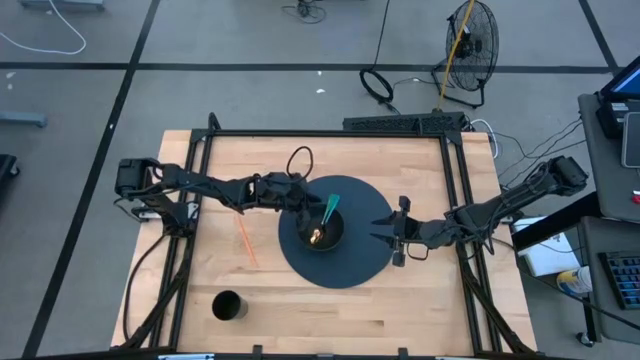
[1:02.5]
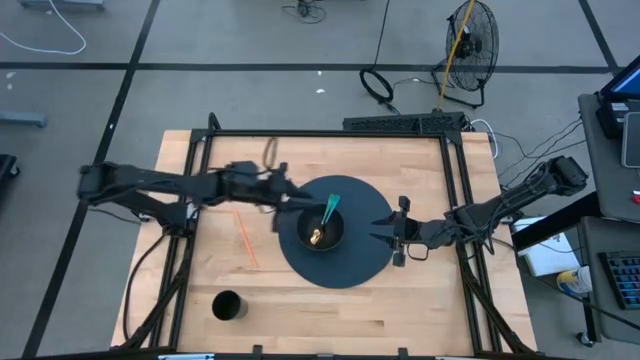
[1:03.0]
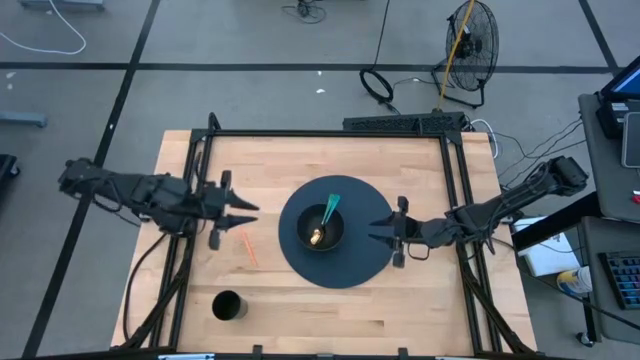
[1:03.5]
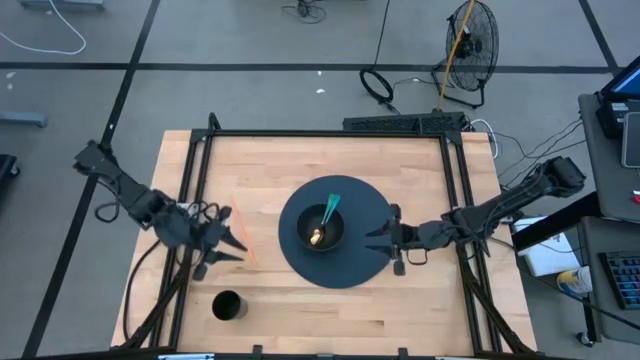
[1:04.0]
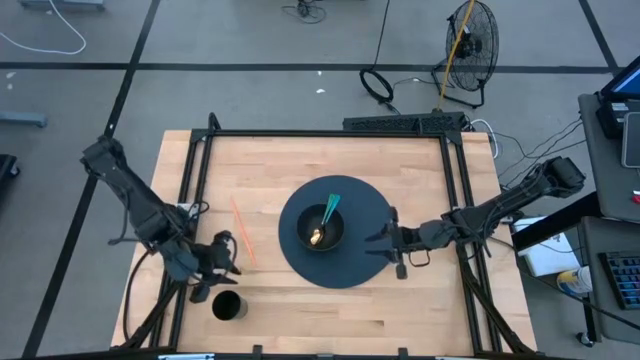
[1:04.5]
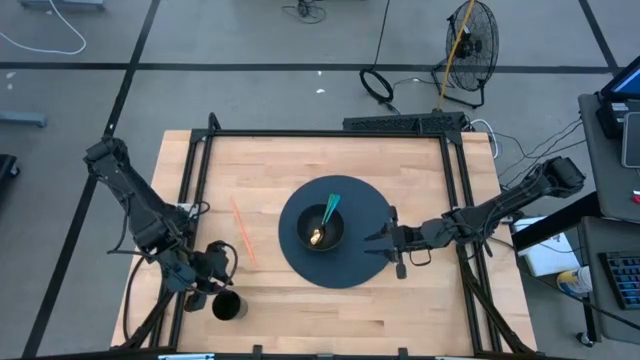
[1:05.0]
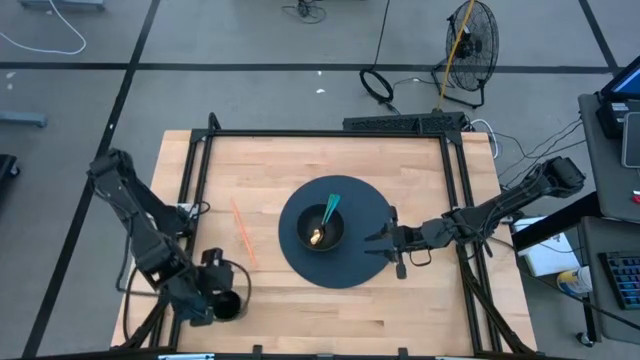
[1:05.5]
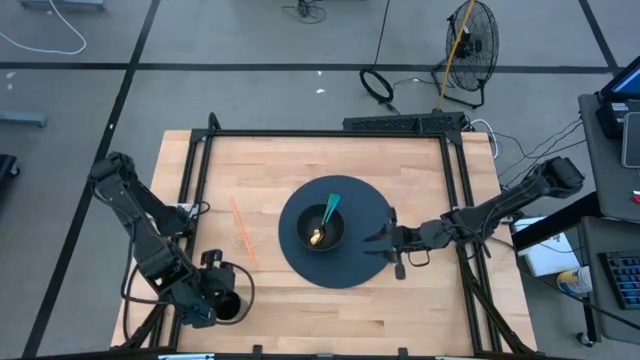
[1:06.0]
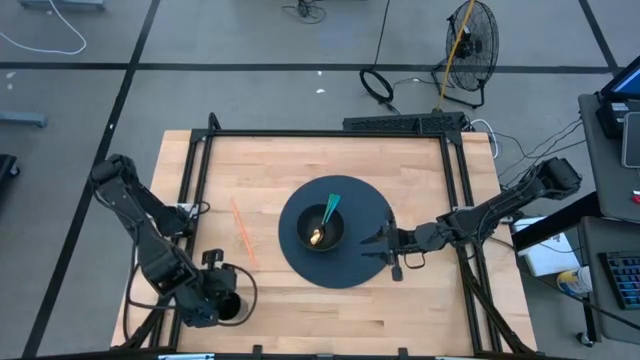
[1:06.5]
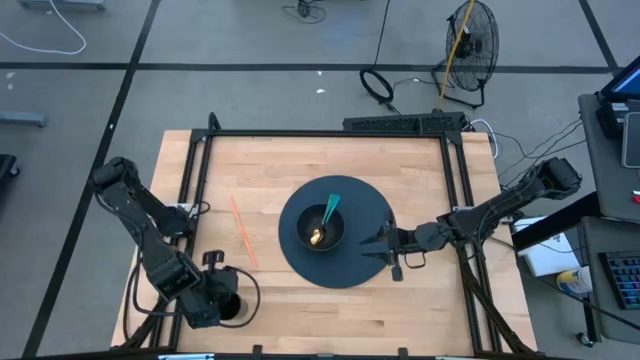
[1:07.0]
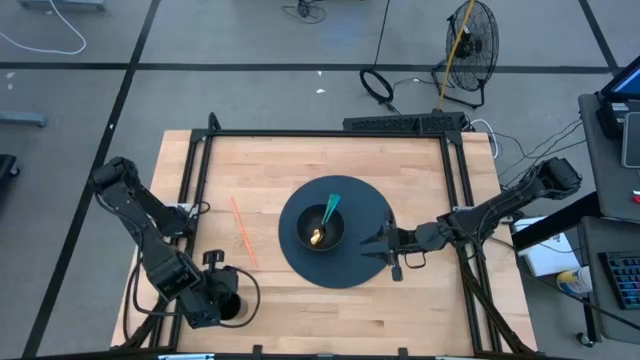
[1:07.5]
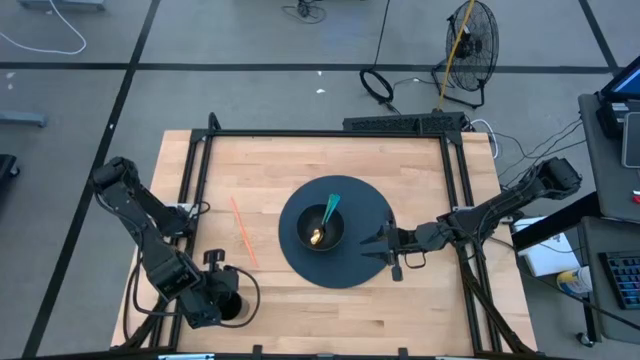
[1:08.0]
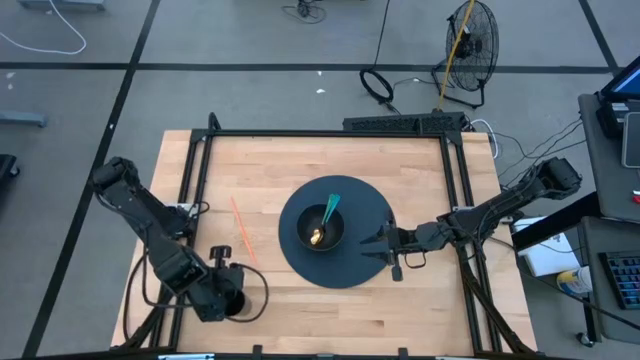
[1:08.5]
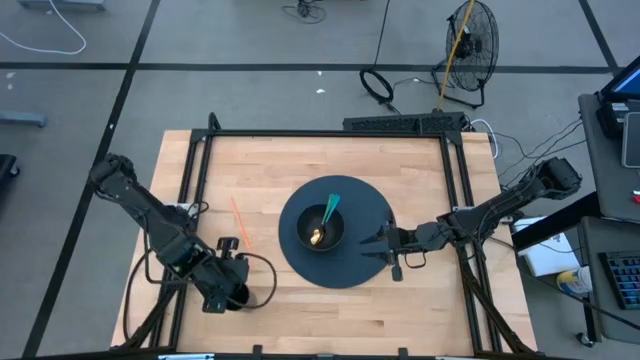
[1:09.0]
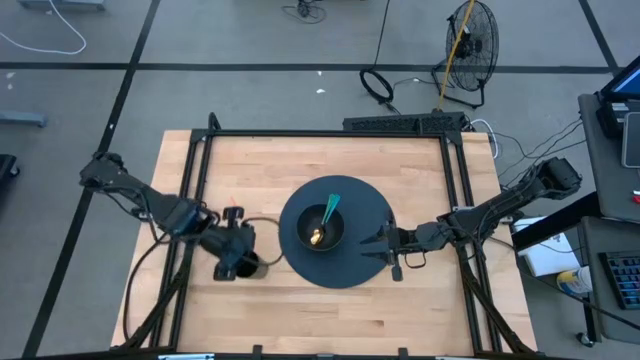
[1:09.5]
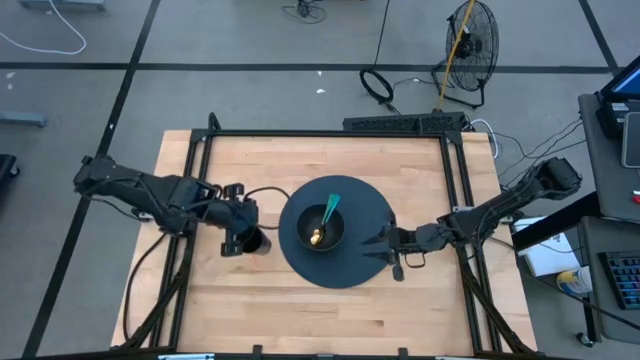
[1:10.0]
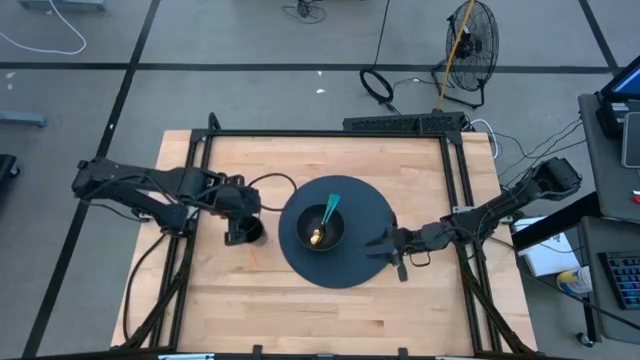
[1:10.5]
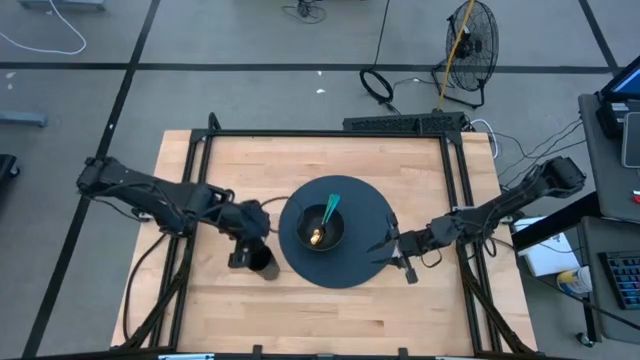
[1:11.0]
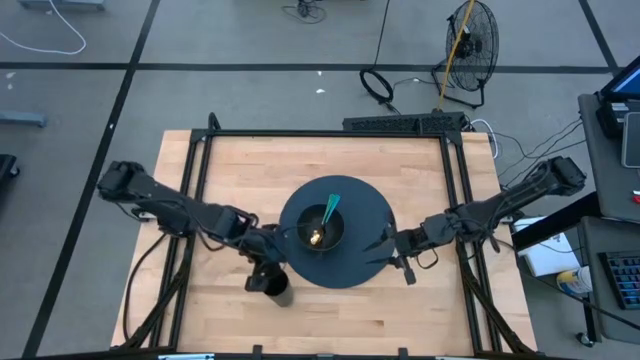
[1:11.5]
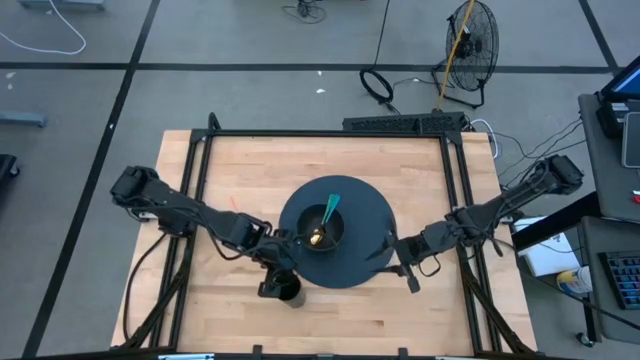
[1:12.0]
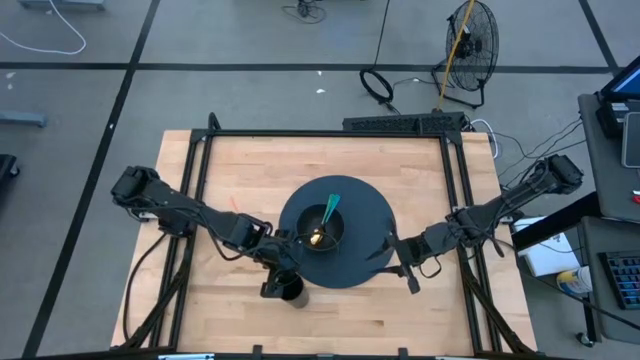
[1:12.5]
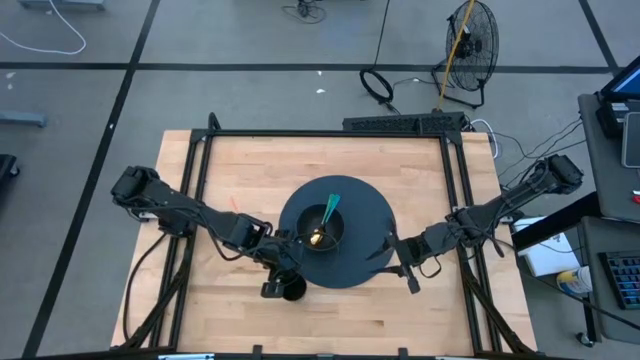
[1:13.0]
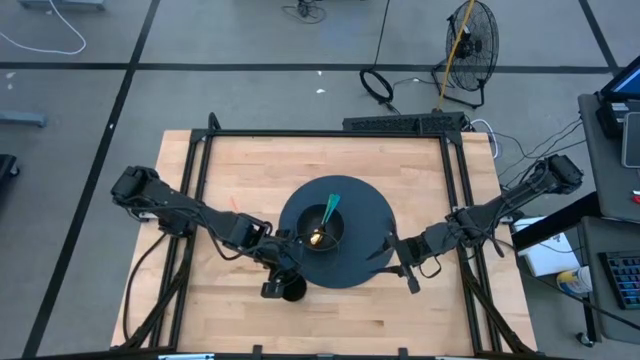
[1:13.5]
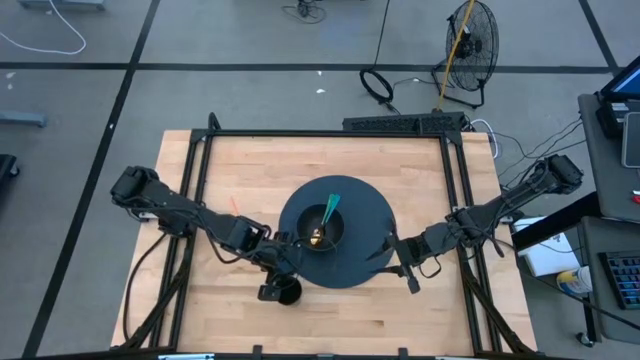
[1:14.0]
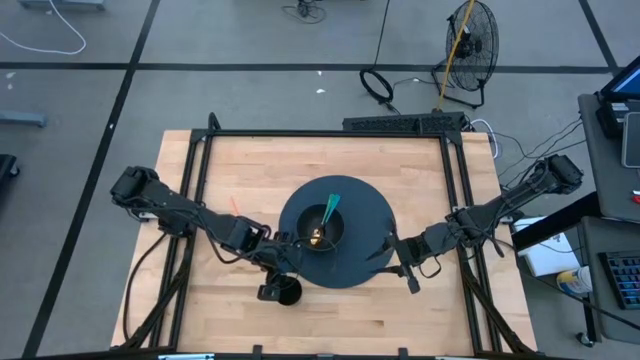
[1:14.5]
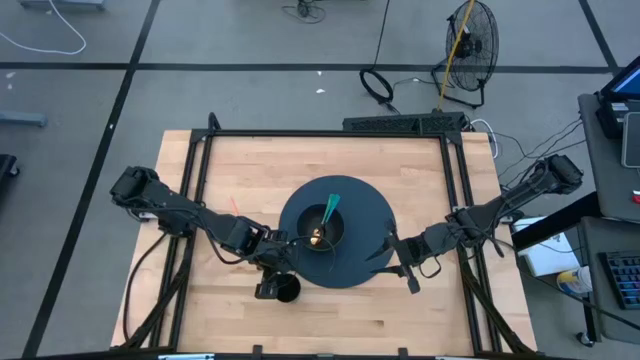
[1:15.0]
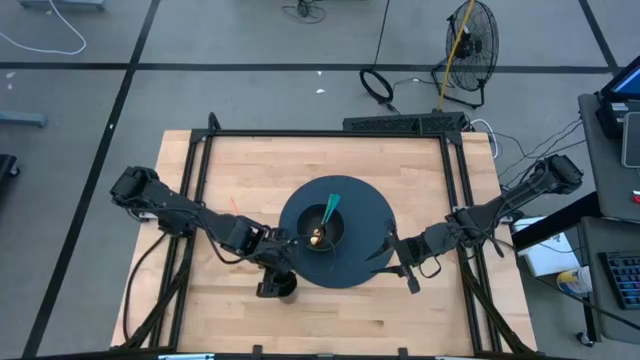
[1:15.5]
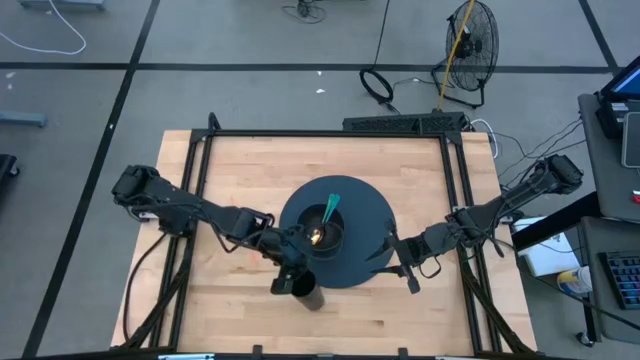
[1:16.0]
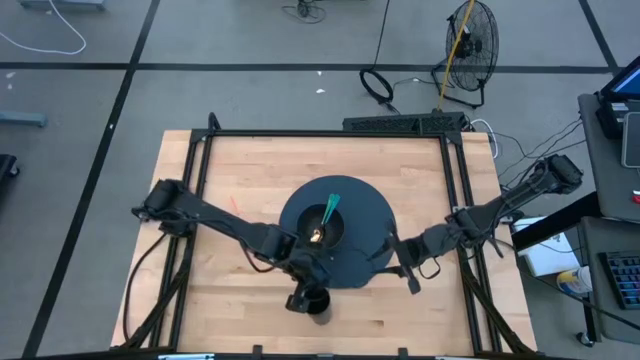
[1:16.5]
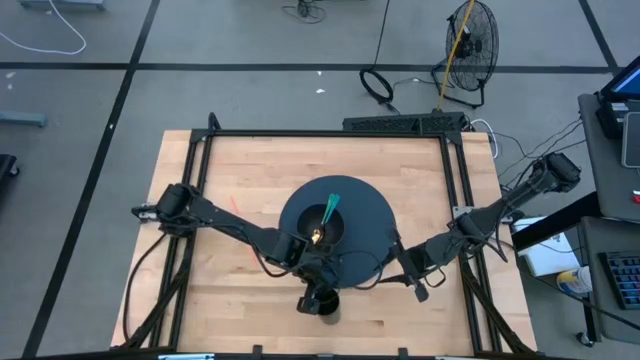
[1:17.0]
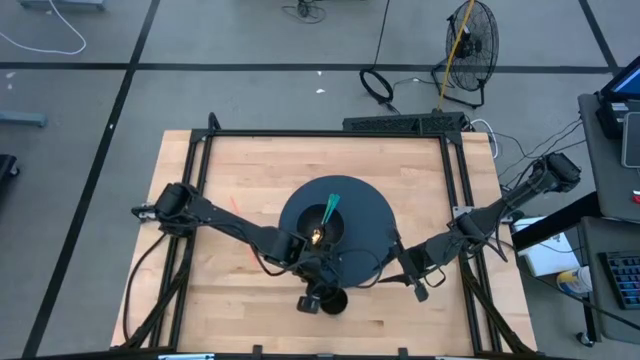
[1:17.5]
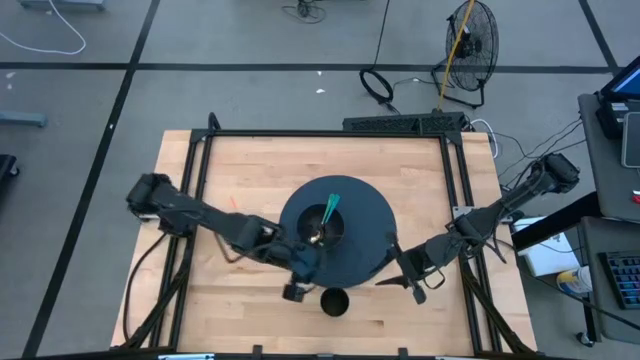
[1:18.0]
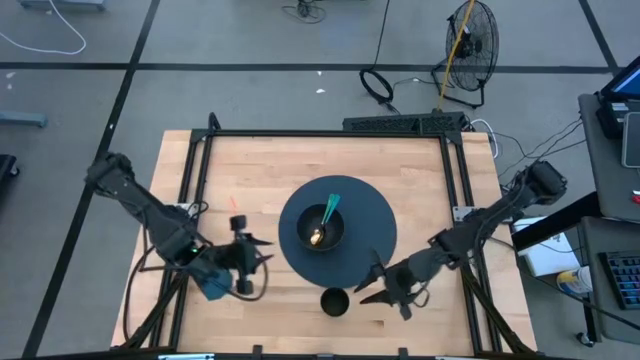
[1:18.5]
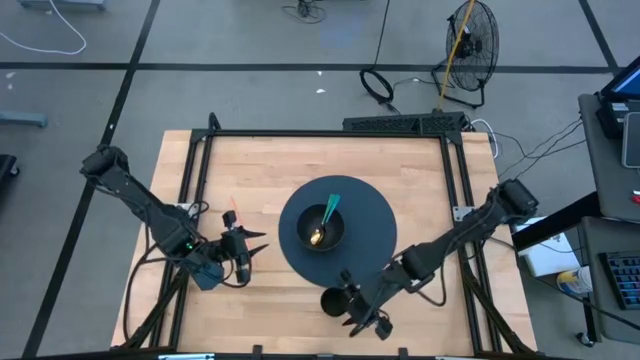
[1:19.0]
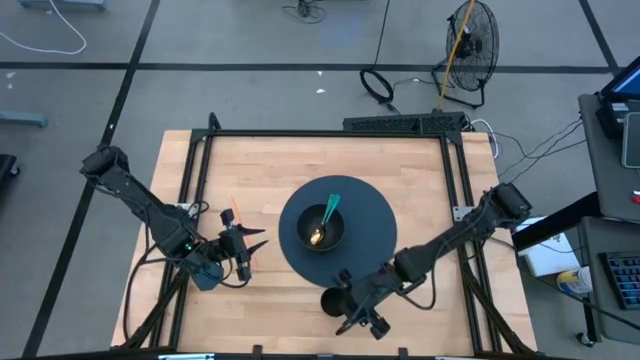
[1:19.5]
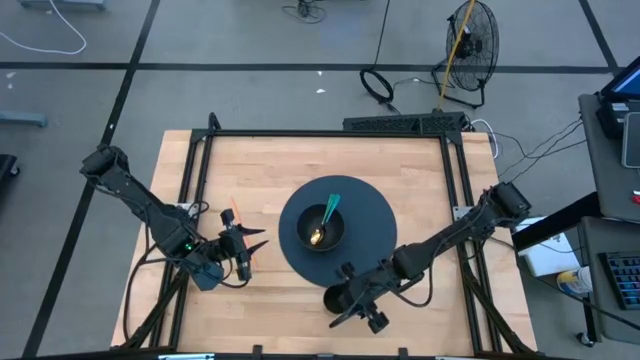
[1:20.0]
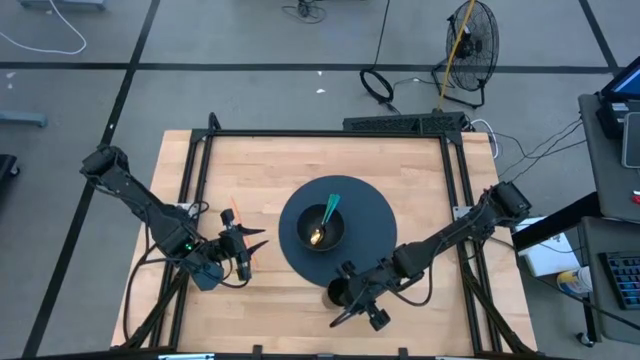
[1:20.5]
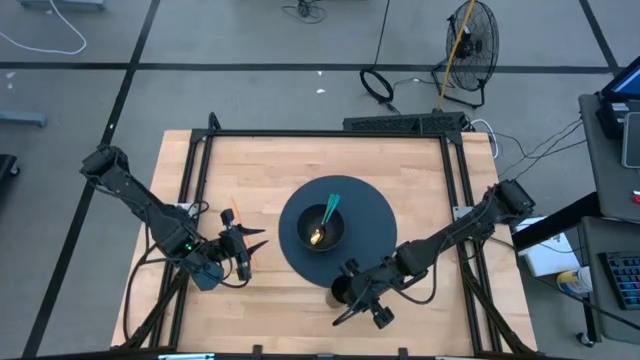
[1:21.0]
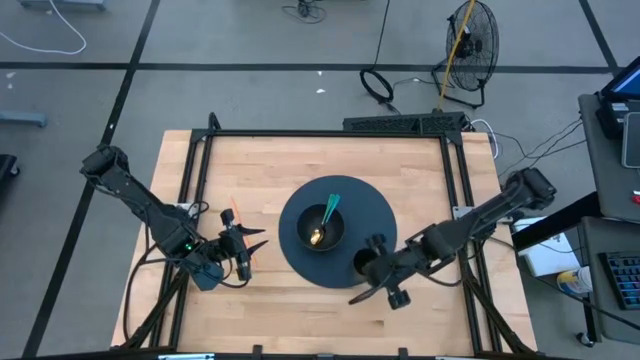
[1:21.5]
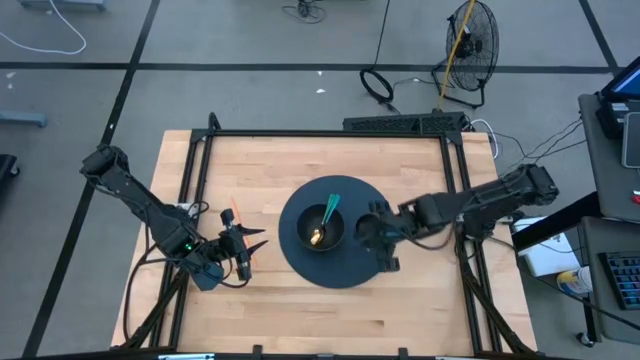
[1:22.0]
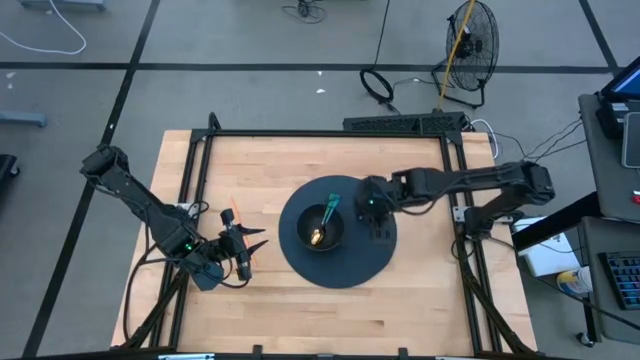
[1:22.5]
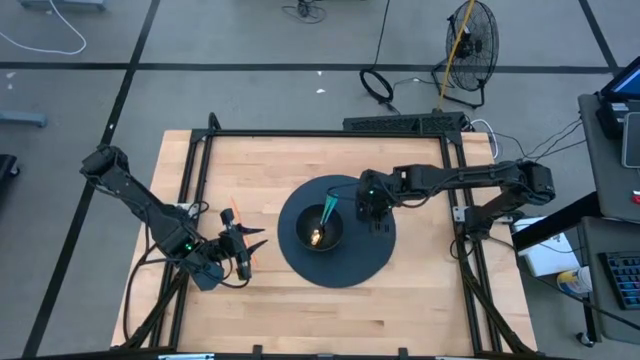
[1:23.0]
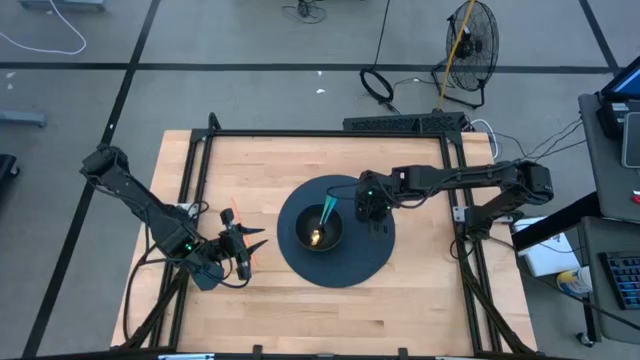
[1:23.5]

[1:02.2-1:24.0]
Task: Pick & Place Utensil
Put the black cup to the right side of the black cup on the blue table placemat
